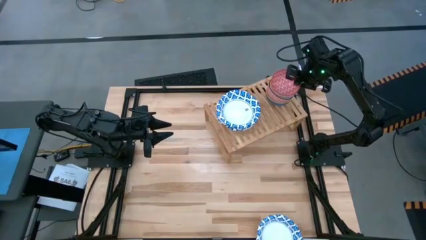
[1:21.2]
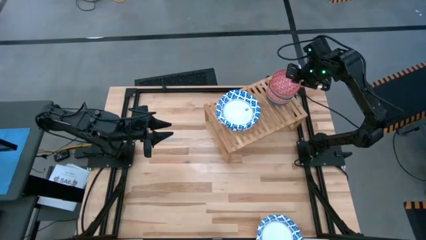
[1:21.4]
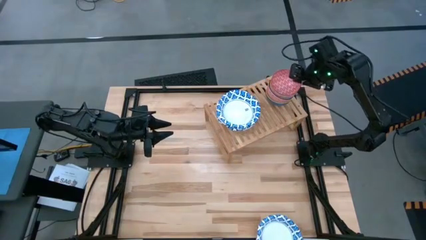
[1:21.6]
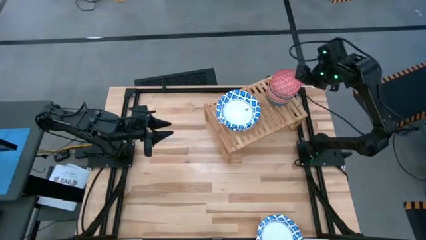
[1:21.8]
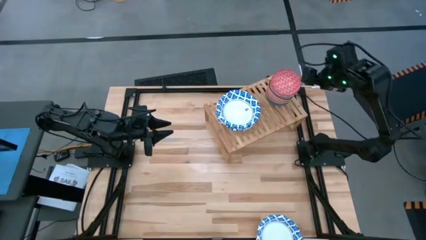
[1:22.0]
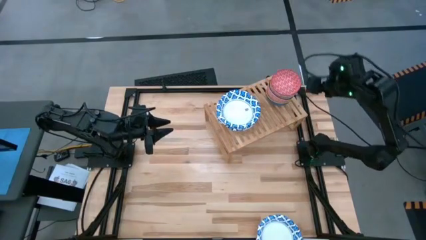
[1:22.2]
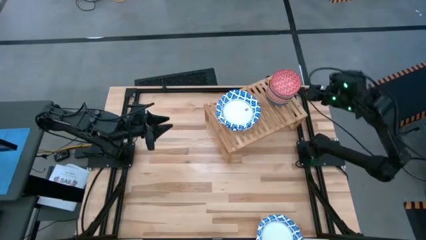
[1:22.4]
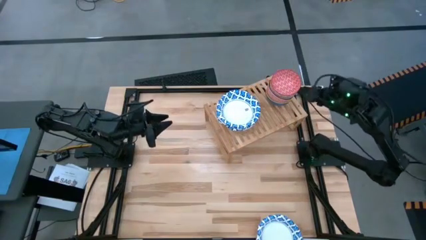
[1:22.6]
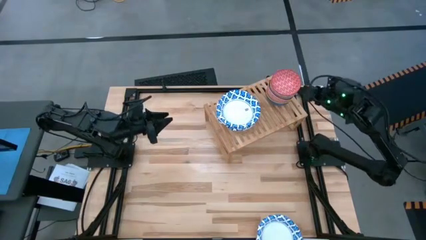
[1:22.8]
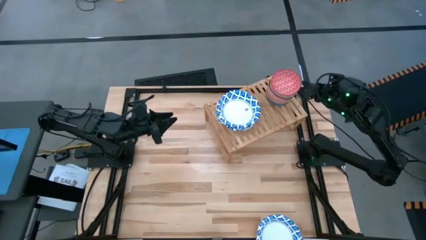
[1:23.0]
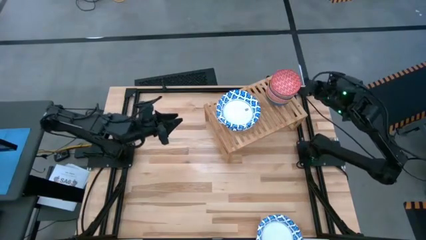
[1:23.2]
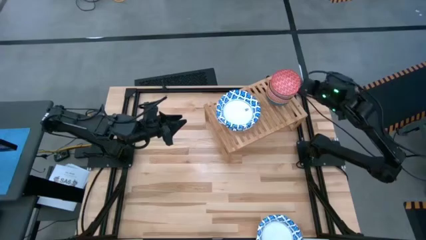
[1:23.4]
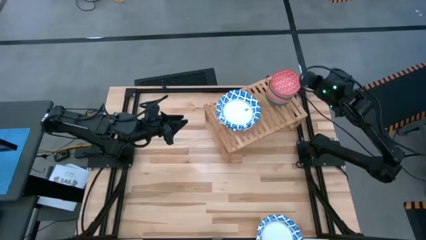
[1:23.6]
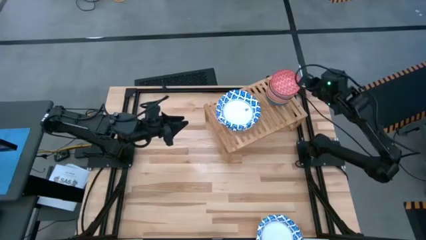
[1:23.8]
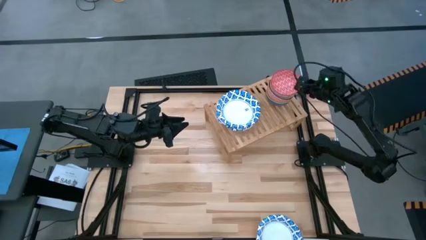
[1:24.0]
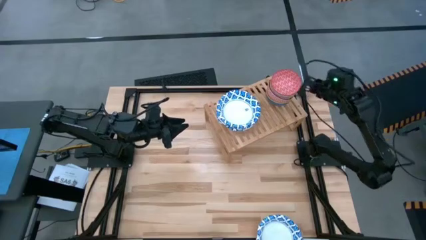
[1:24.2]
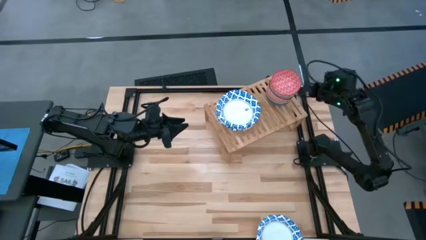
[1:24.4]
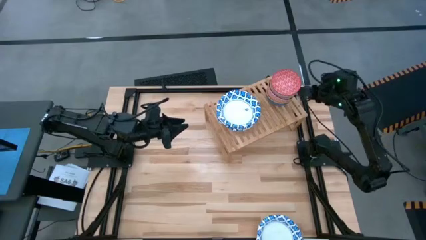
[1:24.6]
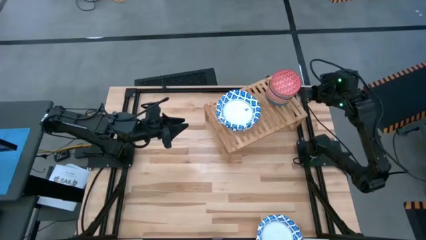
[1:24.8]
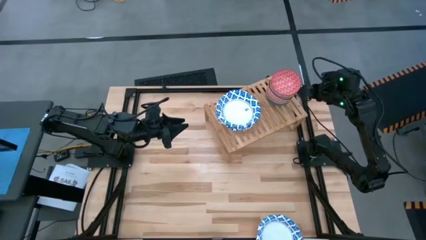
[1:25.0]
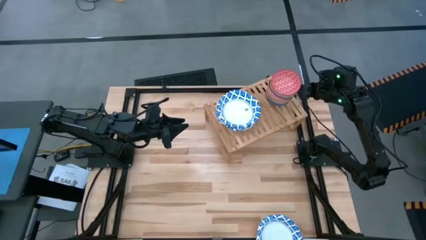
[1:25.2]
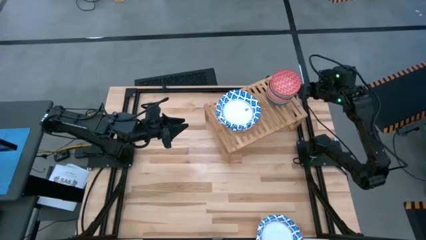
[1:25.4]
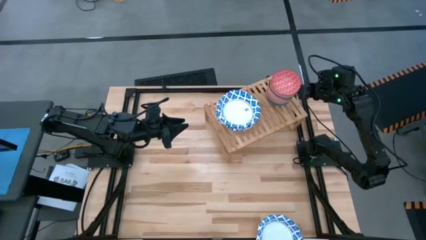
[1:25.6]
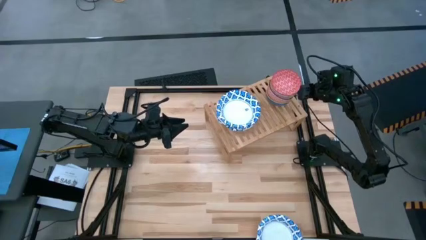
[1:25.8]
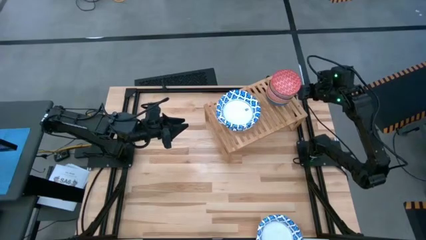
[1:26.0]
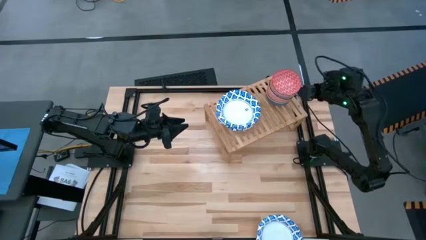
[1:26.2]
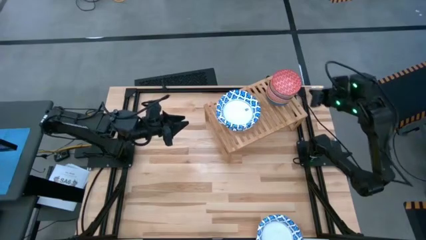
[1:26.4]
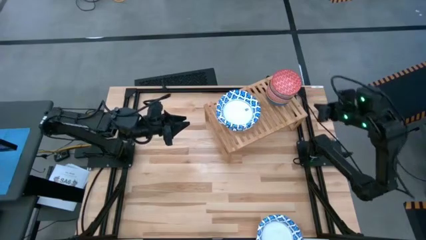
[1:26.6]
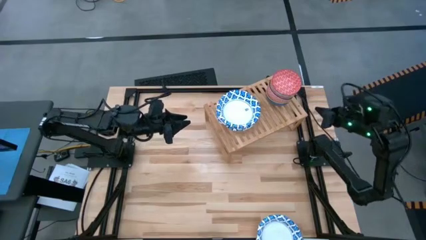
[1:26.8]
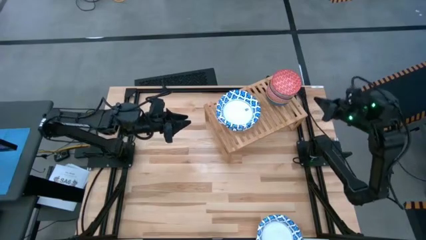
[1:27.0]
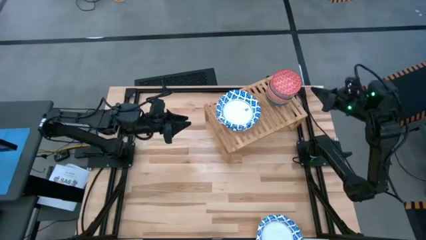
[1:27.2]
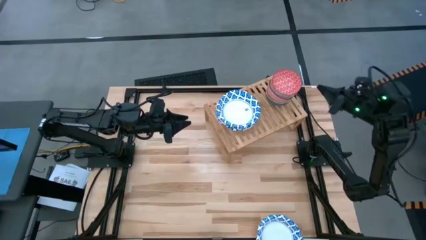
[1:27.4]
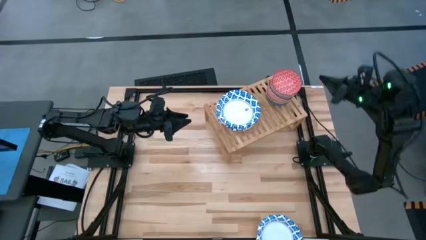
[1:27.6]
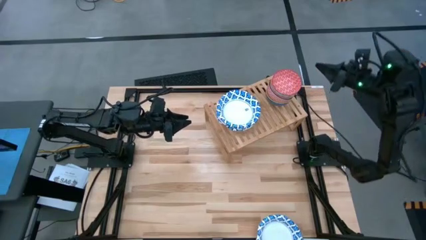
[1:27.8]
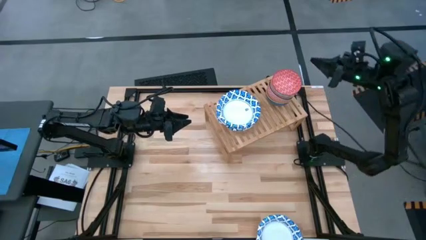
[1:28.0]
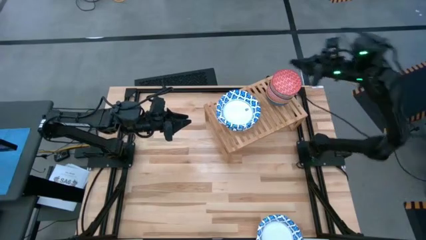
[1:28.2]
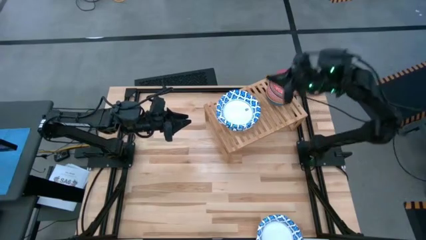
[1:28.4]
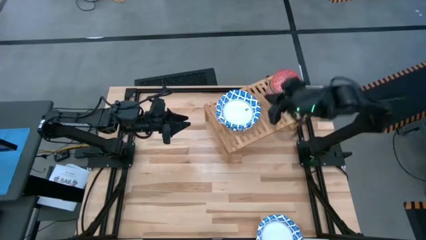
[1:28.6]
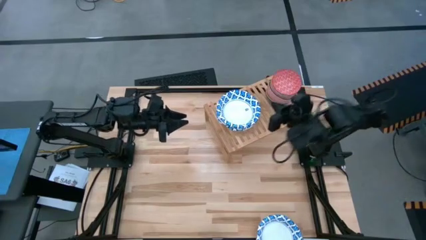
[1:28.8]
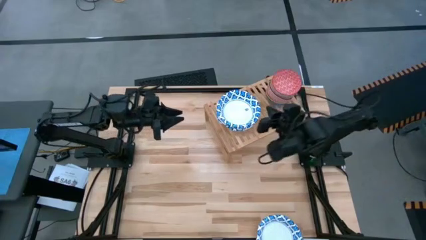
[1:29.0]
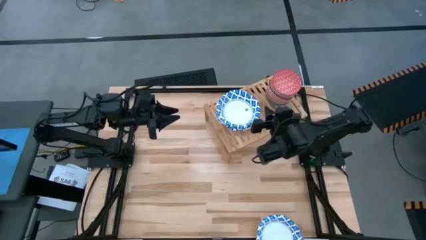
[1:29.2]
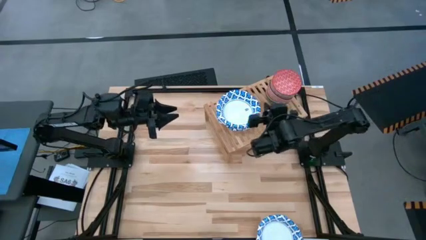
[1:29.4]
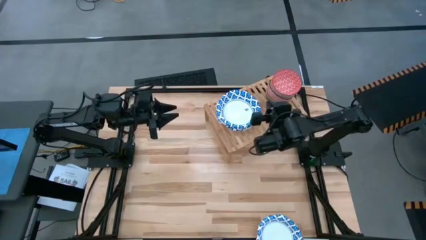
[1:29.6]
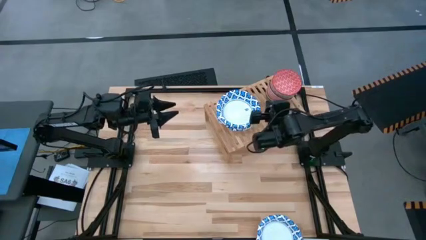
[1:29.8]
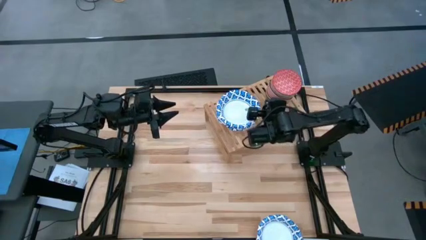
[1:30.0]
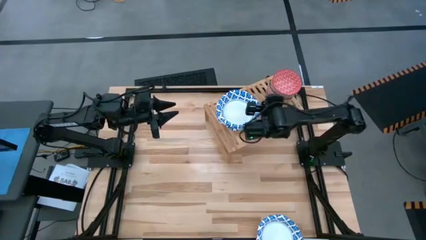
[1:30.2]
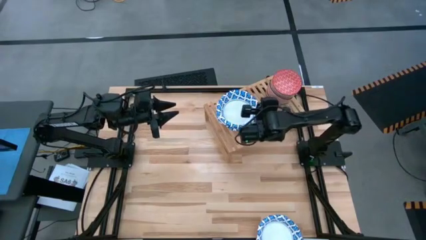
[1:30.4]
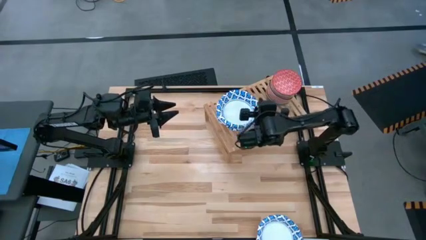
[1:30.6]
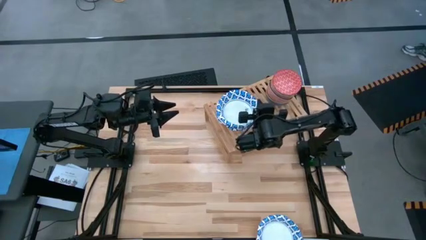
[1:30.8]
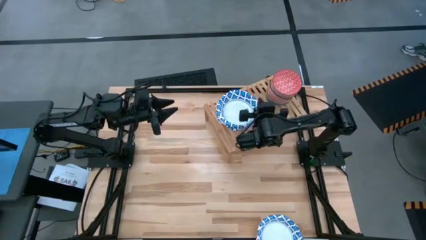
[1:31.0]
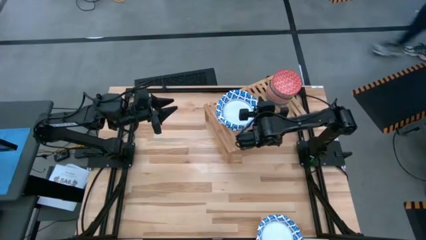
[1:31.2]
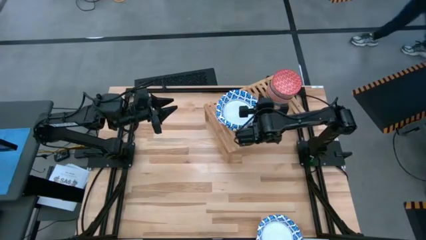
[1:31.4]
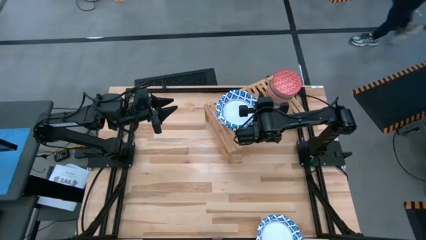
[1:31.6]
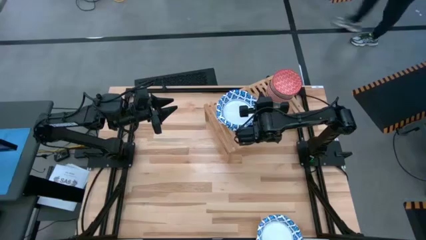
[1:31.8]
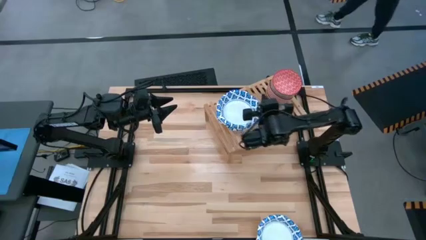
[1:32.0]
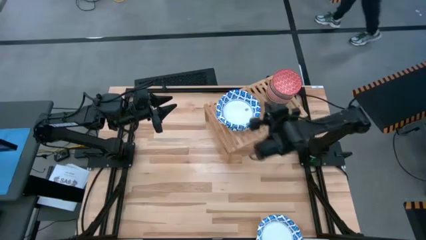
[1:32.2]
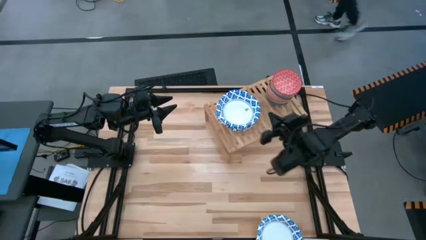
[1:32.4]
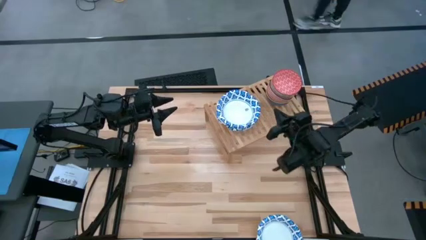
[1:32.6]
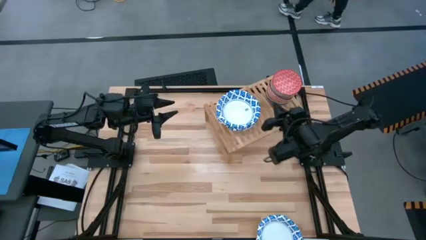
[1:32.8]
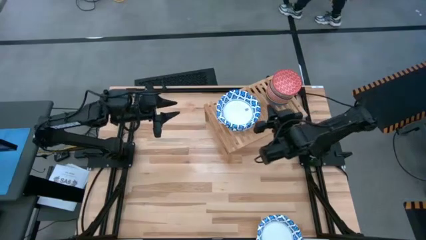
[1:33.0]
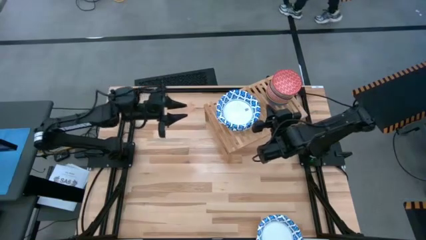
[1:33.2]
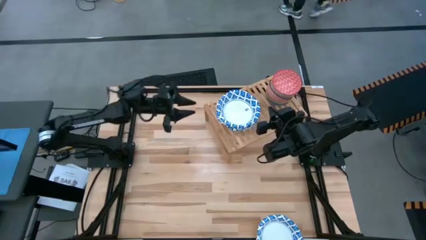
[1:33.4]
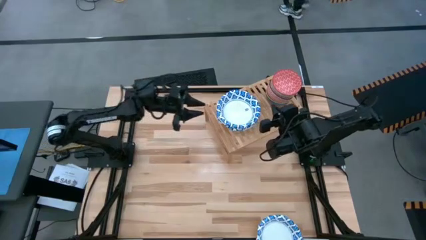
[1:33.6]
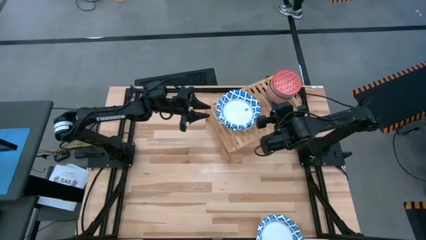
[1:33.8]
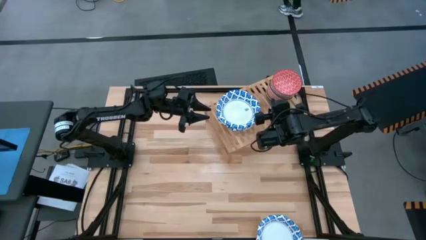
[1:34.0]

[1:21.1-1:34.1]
Task: Place and stack bowls onto a shelf
Adjust the colored pattern bowls on the shelf
